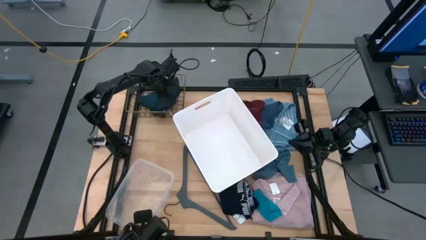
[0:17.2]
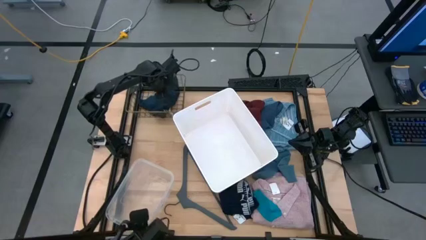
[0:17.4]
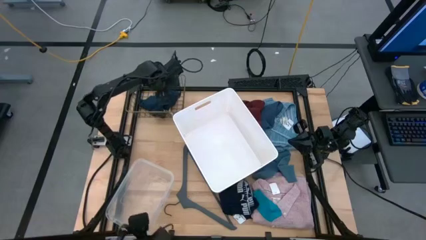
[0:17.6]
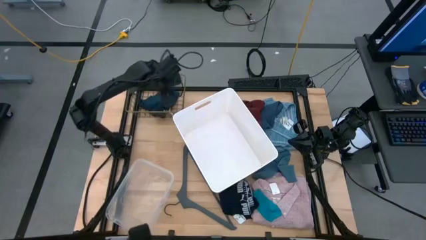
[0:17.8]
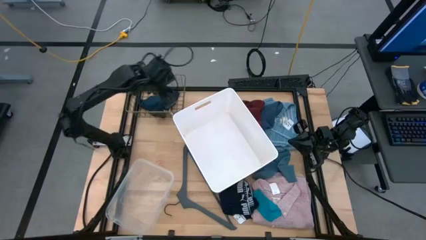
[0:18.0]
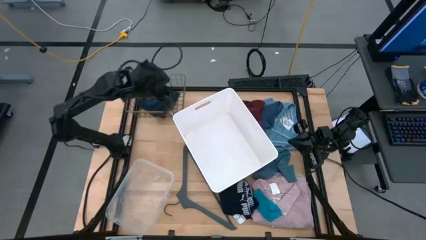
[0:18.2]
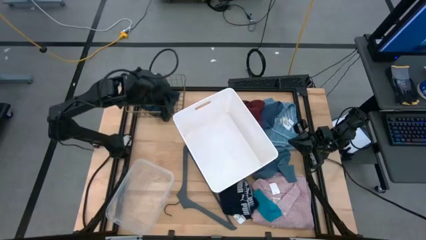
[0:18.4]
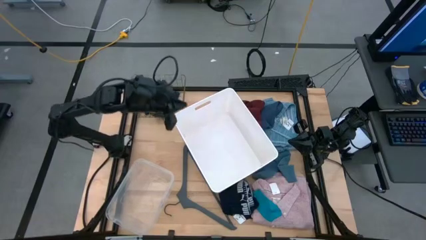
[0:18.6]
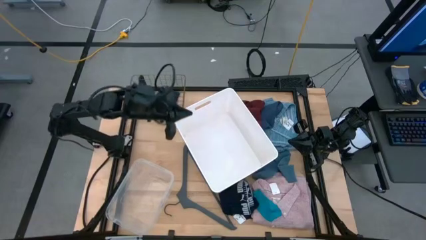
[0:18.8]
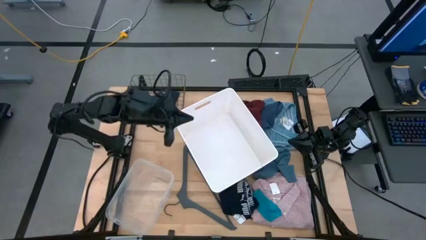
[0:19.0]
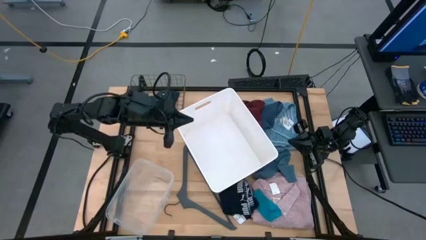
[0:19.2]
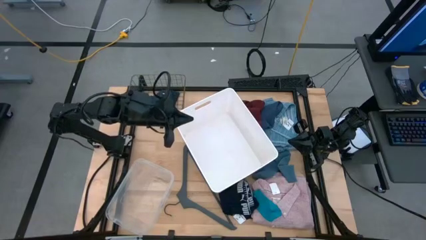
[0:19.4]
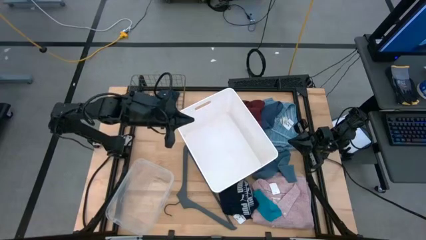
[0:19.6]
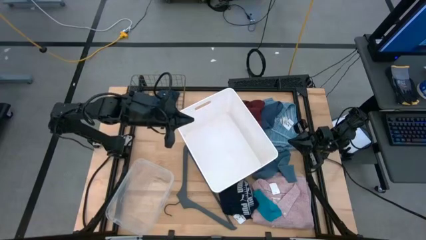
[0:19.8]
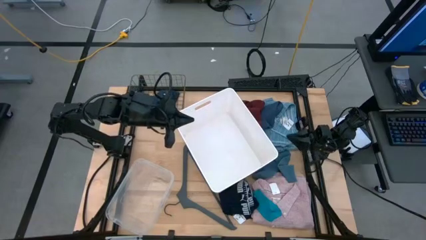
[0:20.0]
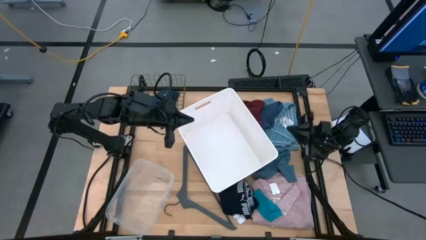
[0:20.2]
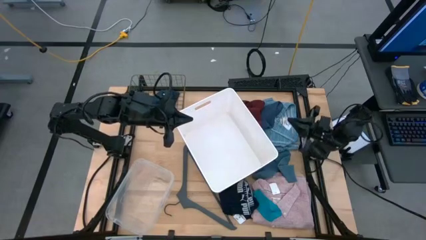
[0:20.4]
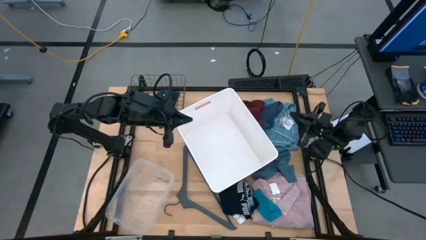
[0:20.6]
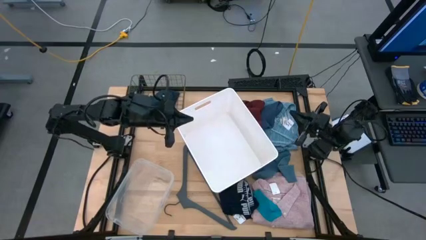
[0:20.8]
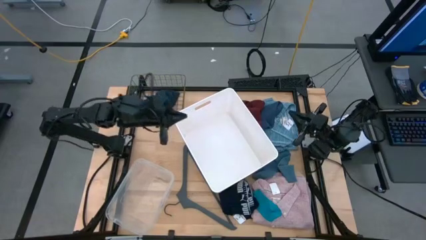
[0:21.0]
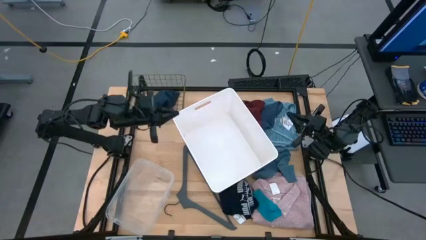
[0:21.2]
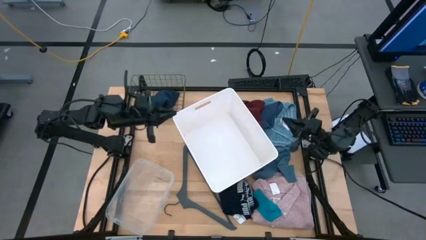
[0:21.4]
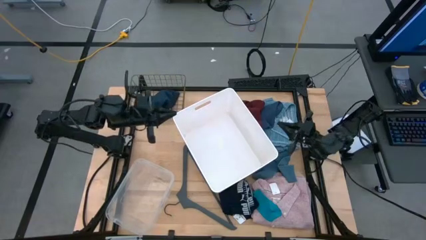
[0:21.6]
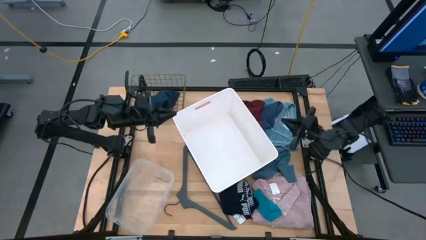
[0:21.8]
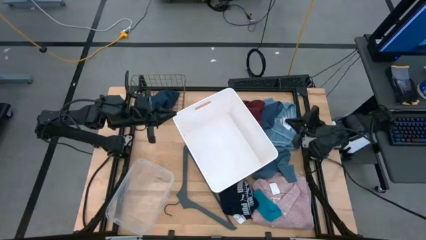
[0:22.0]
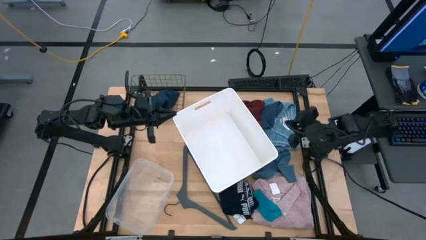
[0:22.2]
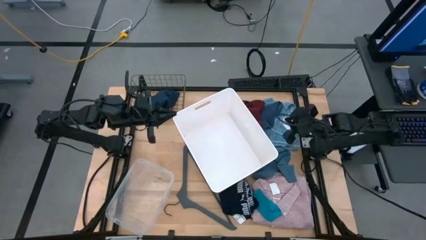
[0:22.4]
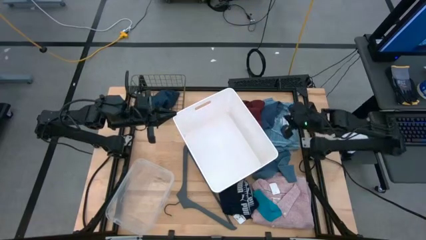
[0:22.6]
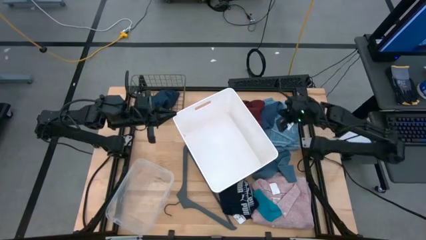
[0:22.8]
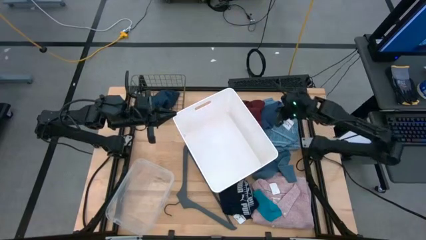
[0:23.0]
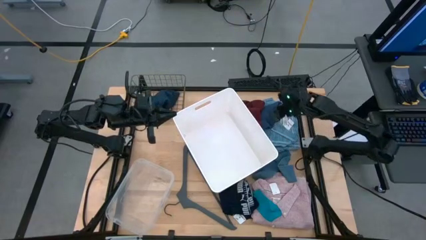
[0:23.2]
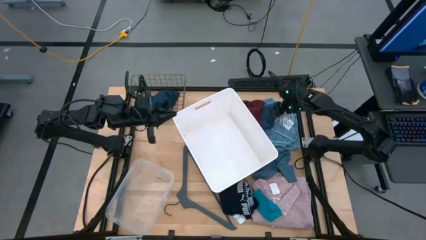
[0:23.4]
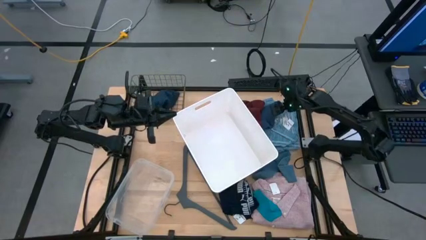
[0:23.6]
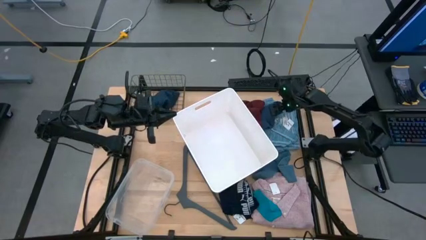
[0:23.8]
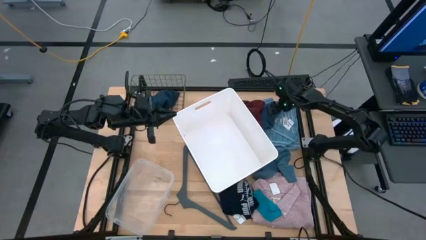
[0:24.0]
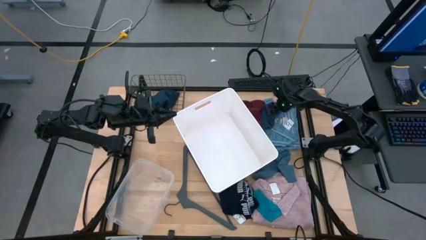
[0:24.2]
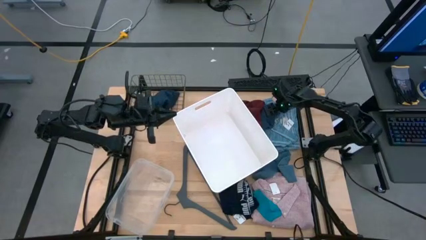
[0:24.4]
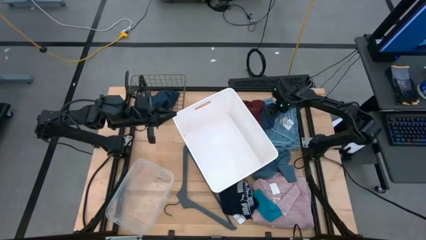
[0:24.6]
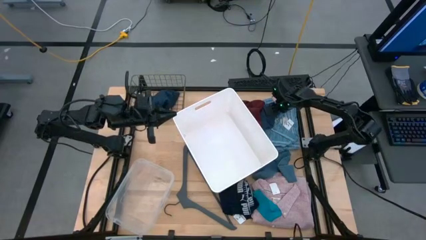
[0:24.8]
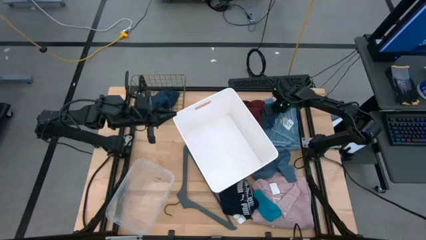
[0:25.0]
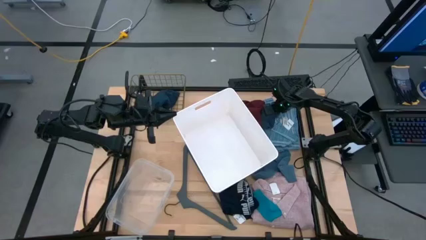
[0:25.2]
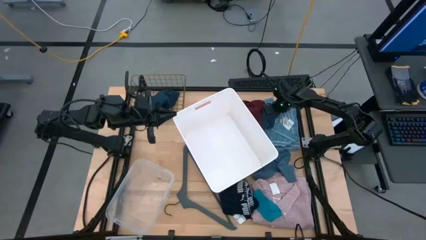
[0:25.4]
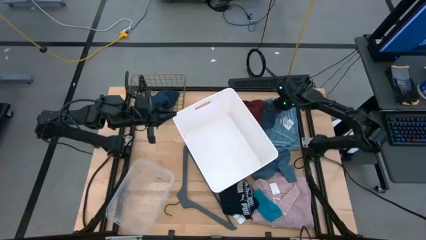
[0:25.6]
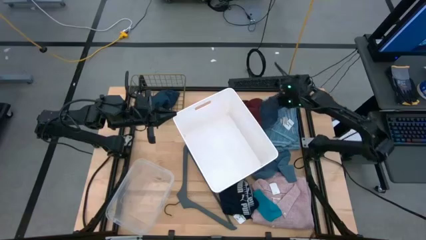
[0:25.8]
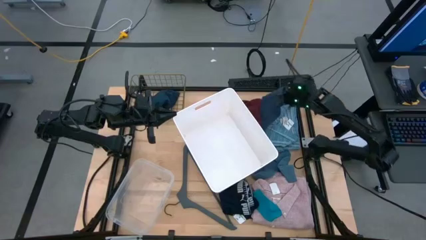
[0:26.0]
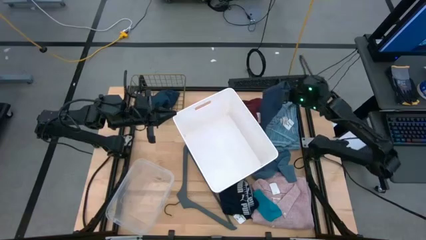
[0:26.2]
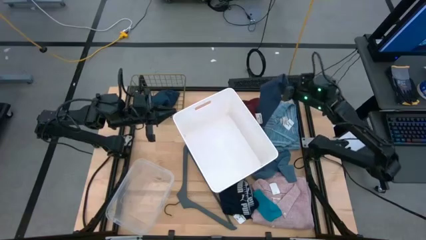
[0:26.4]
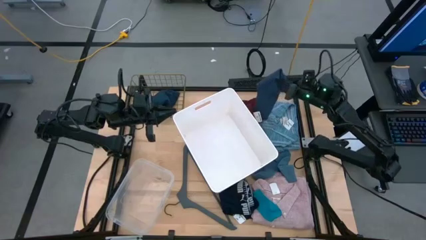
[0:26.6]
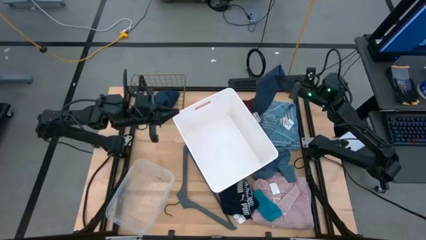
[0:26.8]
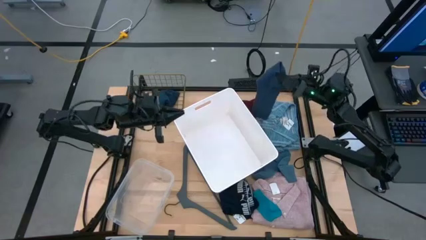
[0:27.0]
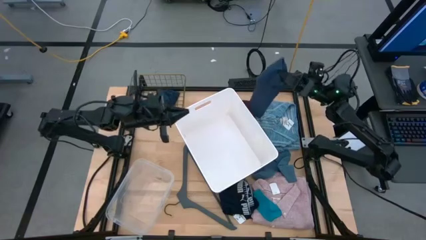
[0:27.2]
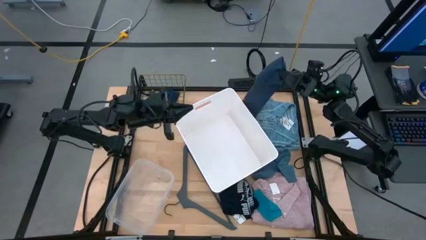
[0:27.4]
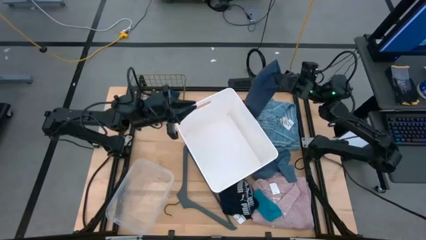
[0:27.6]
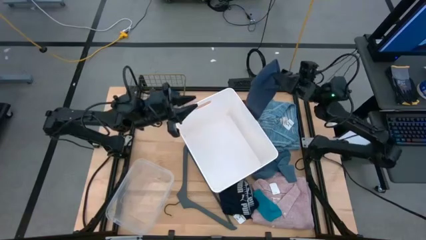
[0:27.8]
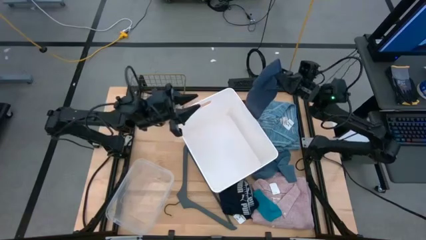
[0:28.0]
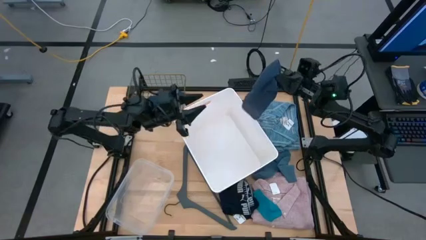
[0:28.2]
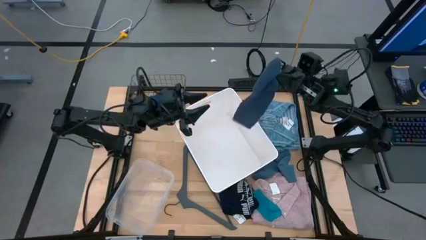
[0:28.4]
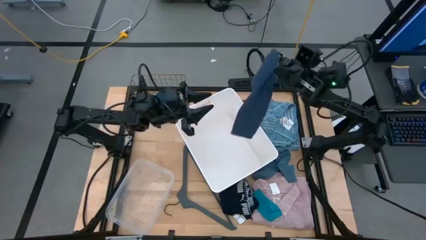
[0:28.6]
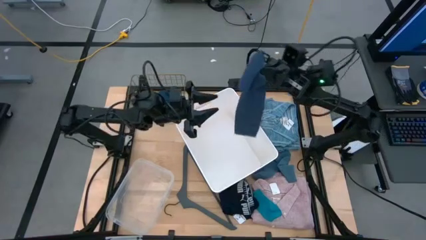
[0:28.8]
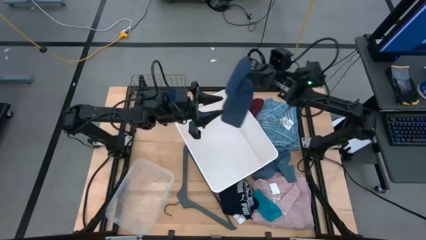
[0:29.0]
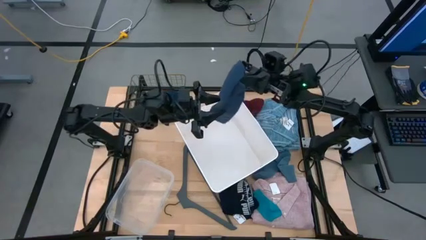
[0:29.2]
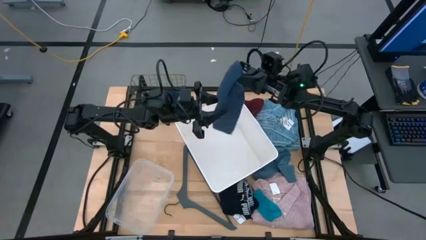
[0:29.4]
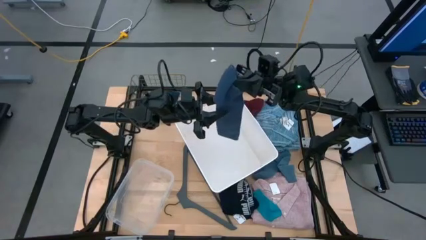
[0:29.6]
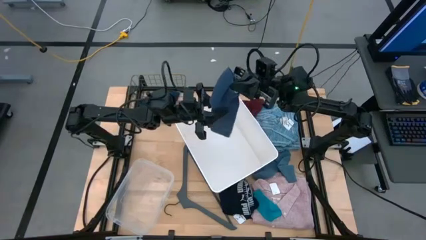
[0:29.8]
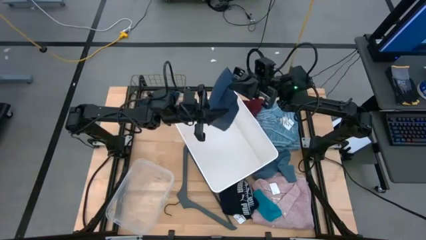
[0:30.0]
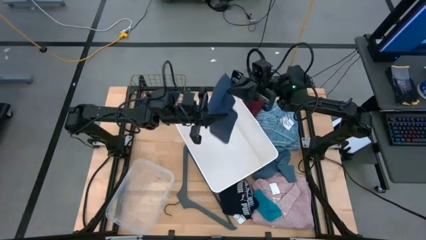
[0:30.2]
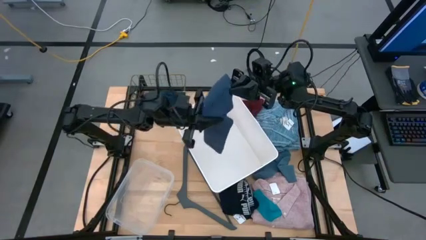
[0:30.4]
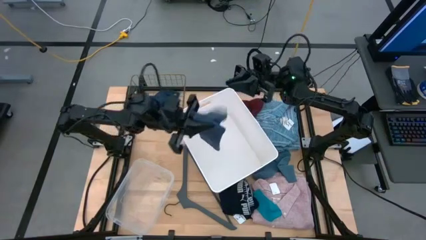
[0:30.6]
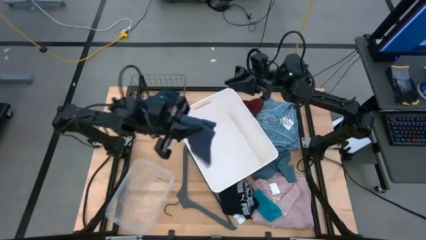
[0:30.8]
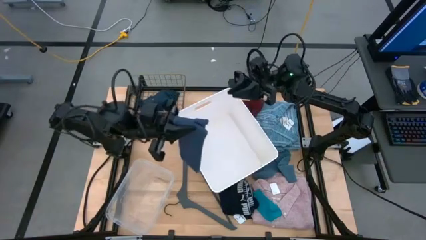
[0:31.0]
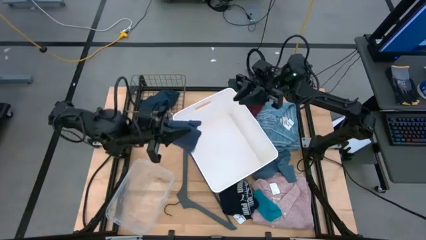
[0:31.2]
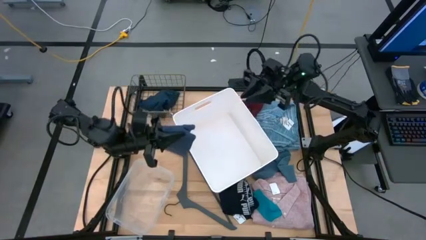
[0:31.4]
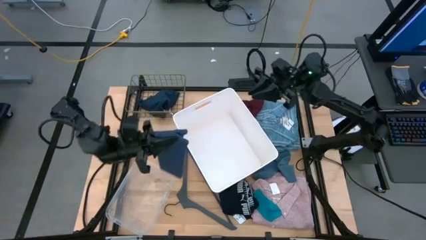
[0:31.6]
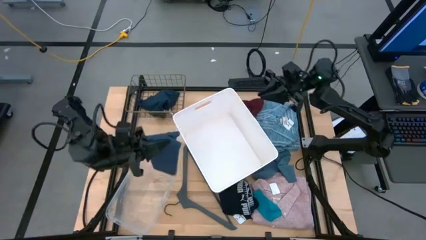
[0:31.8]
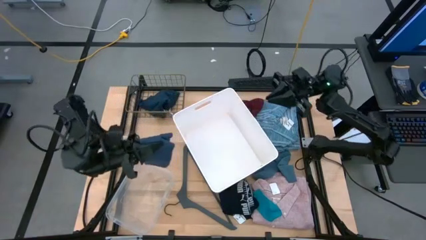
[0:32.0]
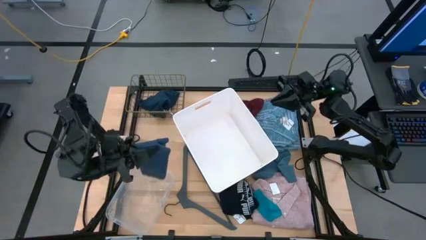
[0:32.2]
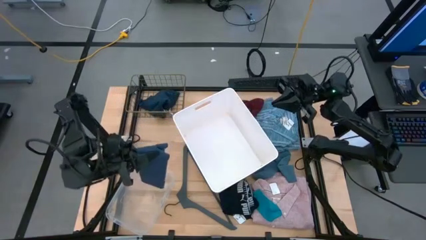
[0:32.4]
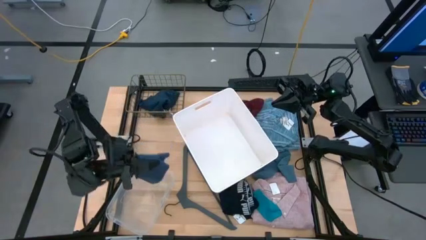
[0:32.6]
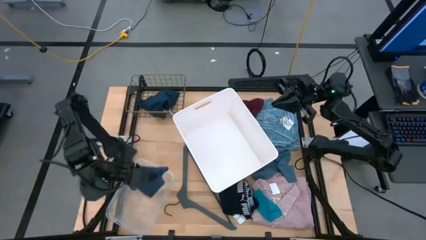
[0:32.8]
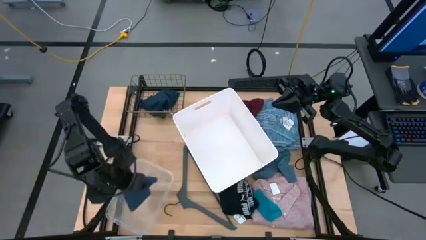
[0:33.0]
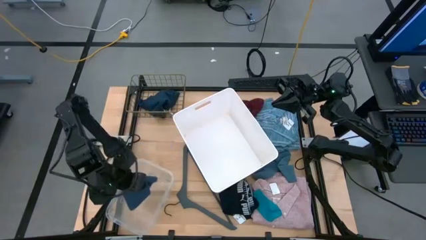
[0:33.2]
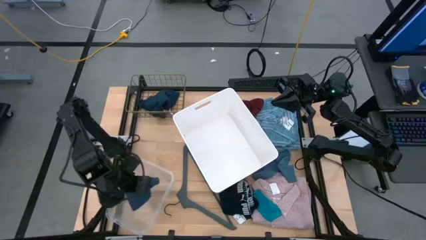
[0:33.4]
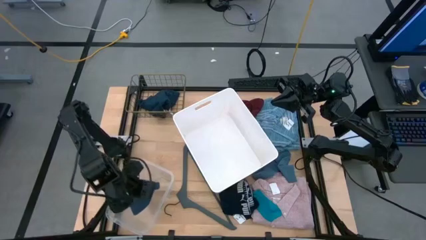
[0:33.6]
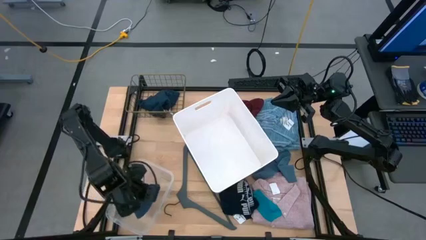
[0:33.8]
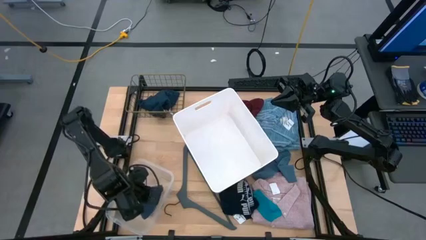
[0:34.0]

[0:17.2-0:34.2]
Task: Pick & Place Cloths
Put the dark blue sock into the transparent bin
